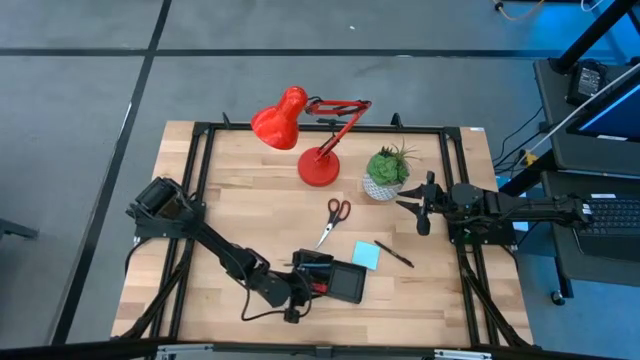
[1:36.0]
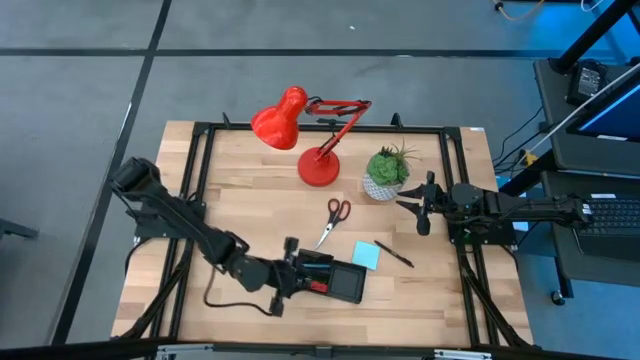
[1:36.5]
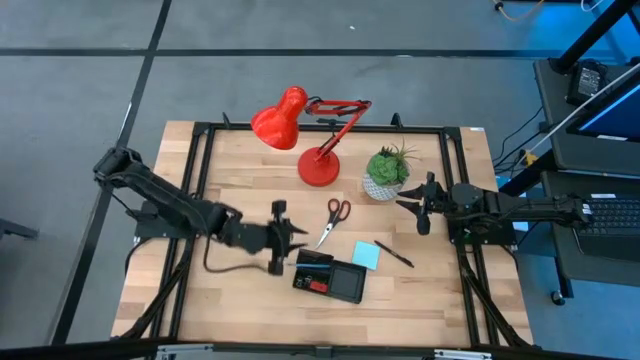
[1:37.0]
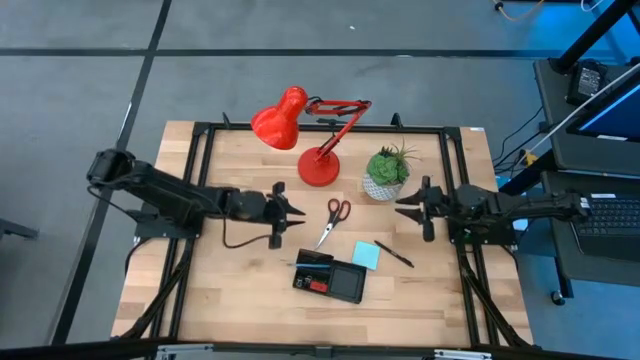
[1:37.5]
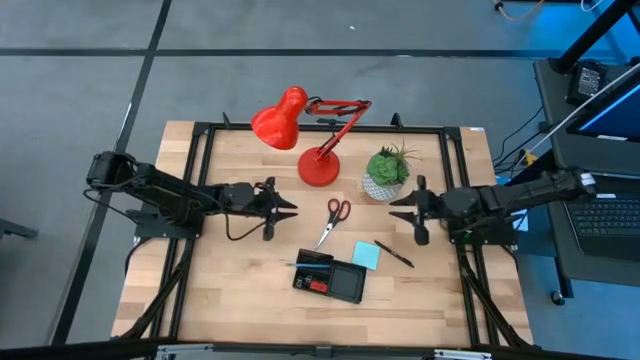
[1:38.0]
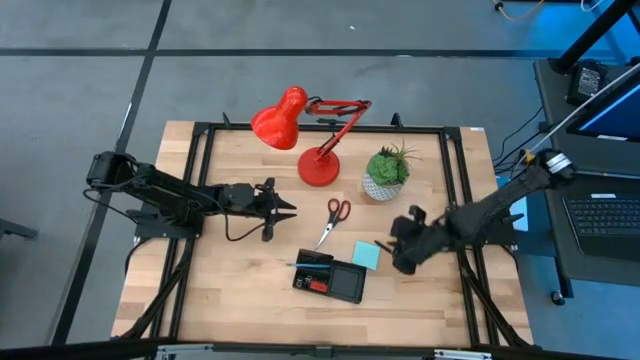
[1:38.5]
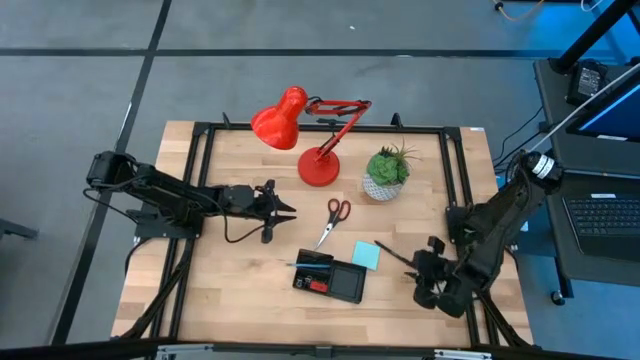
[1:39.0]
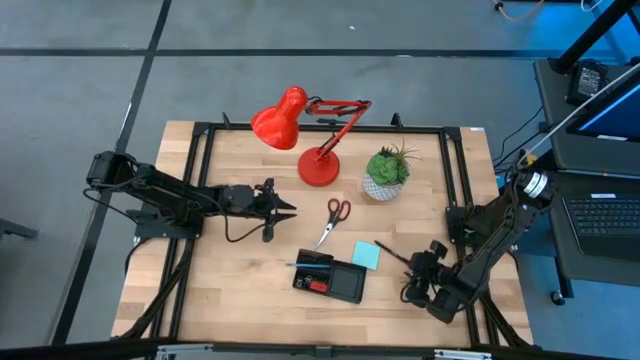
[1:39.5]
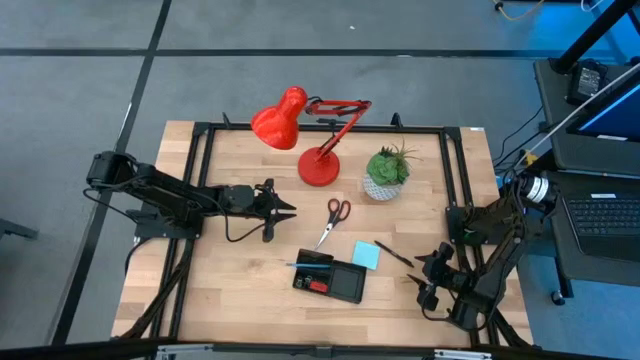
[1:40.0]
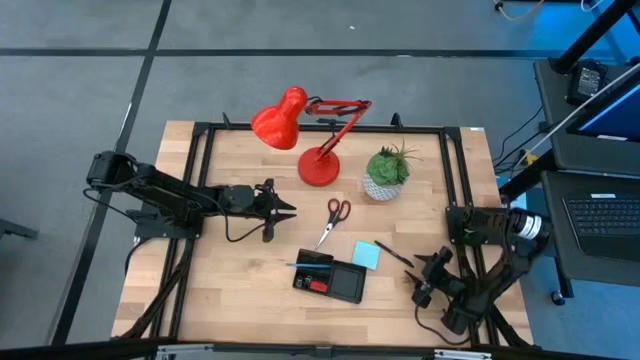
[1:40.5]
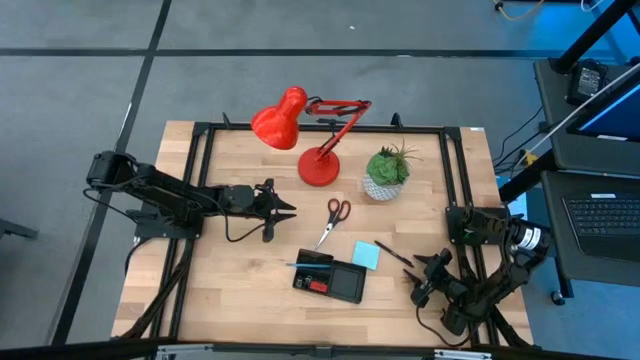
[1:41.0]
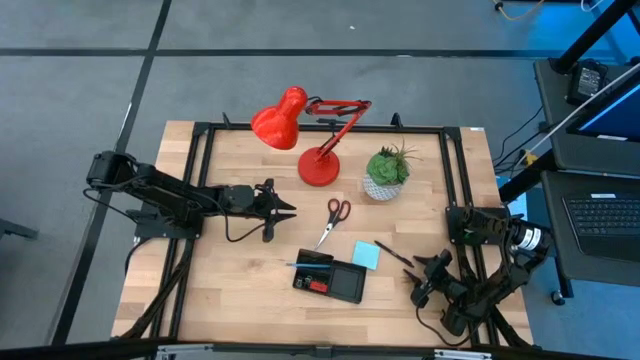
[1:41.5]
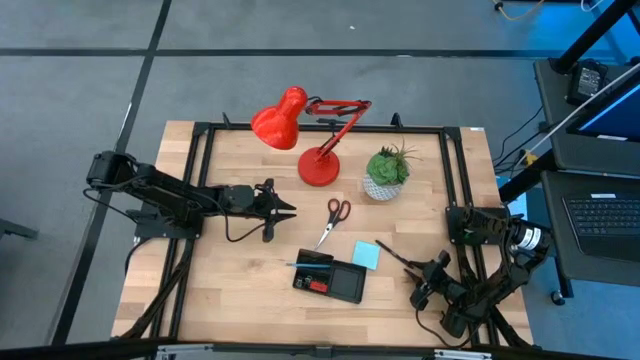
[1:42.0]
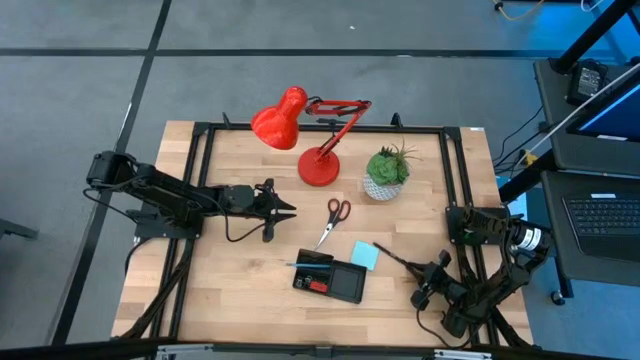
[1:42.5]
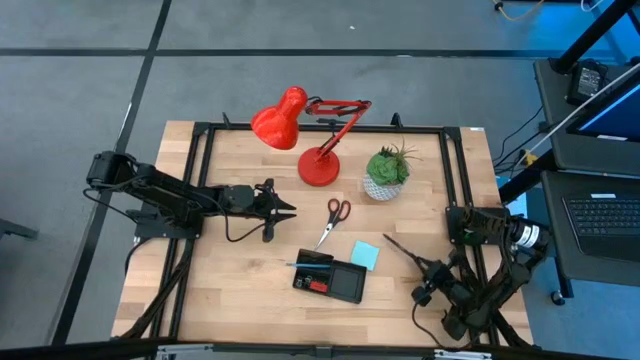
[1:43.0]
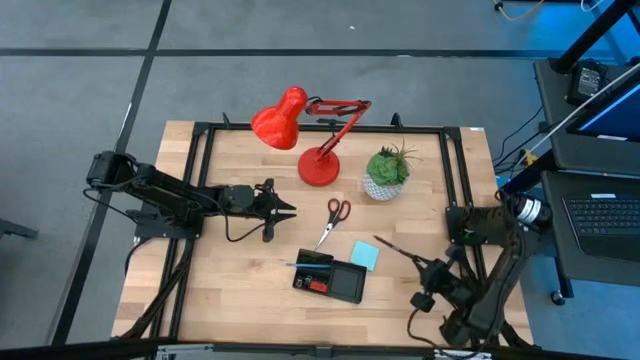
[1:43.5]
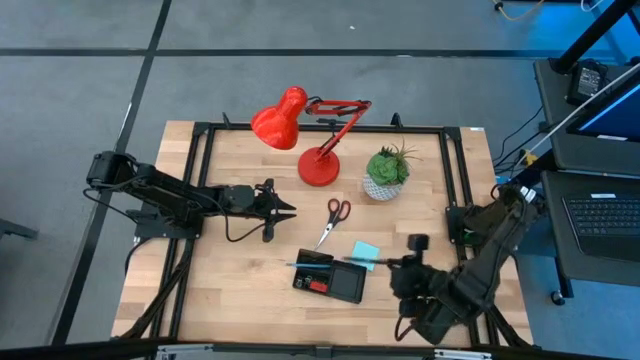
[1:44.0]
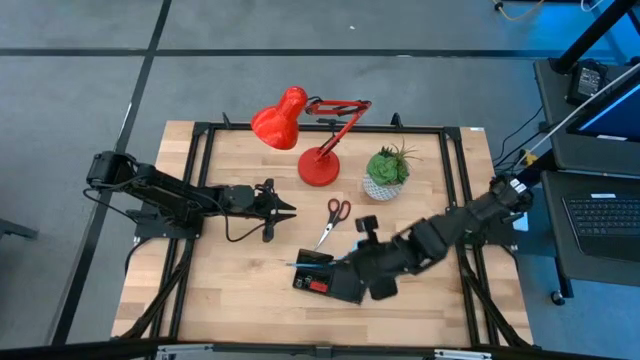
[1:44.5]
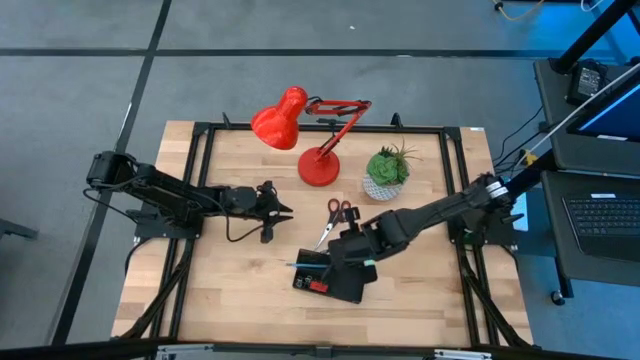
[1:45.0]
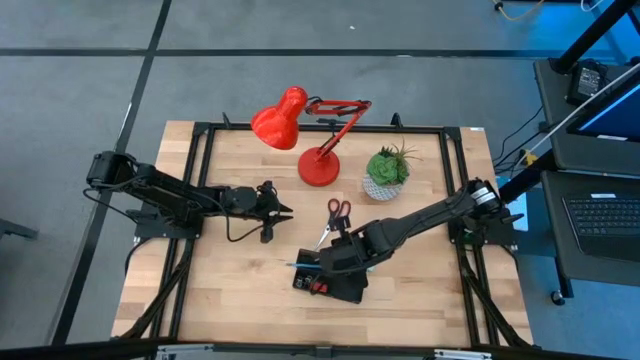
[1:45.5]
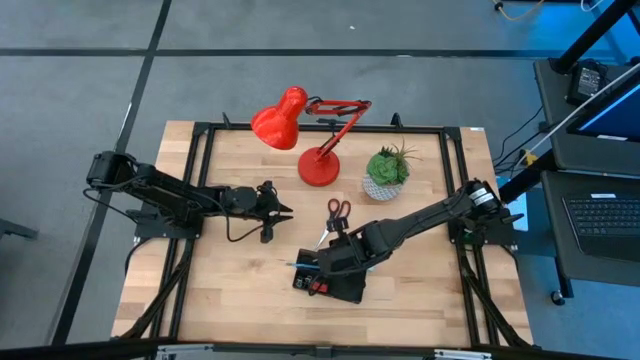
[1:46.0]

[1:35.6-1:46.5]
Task: Pick and place office supplies into organizer
Put the black pen into the black desk organizer

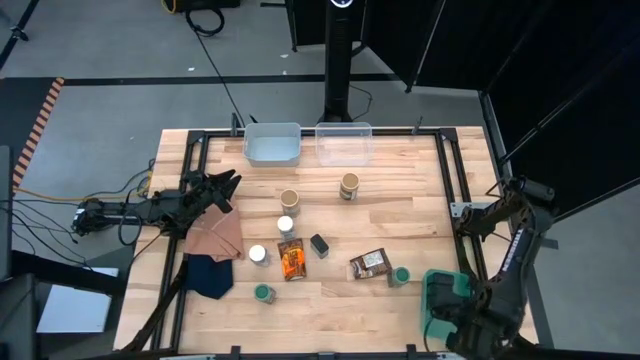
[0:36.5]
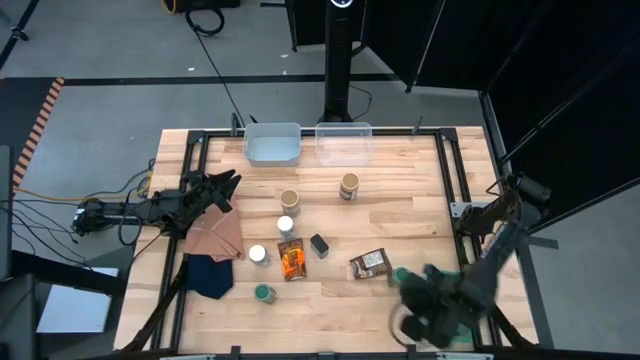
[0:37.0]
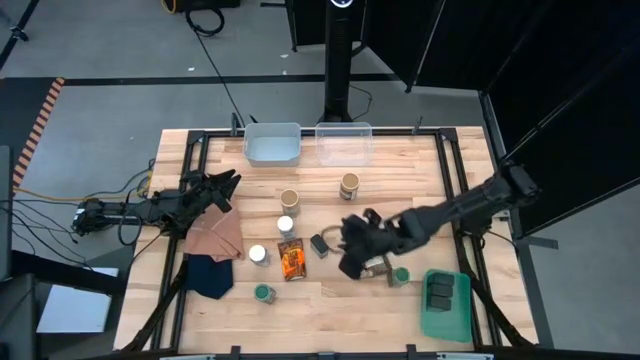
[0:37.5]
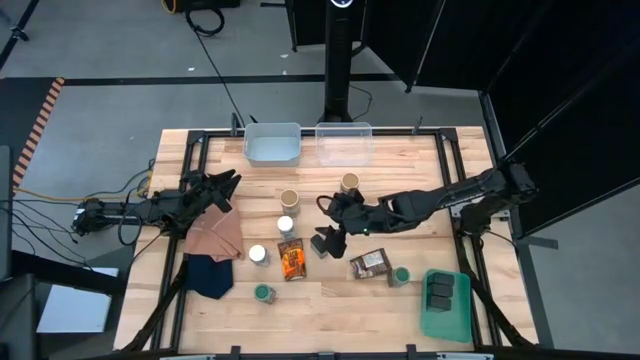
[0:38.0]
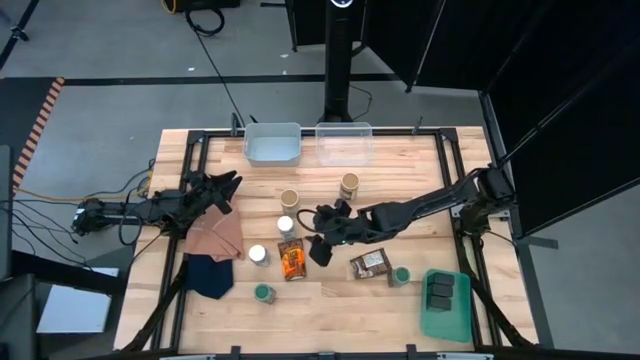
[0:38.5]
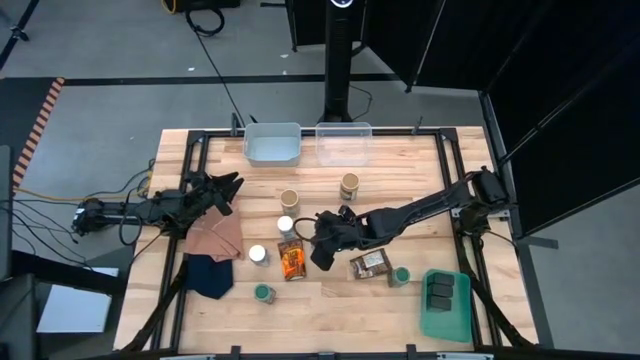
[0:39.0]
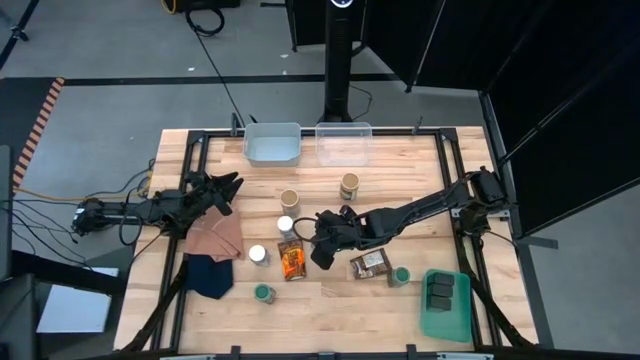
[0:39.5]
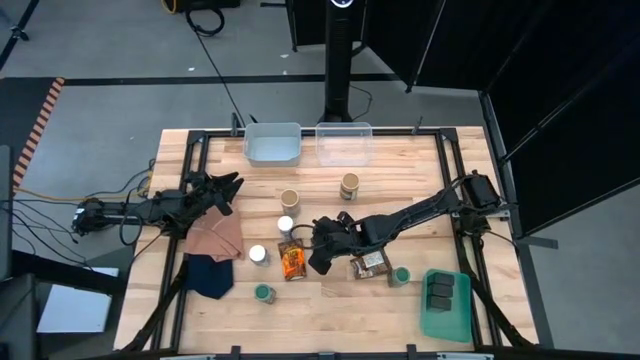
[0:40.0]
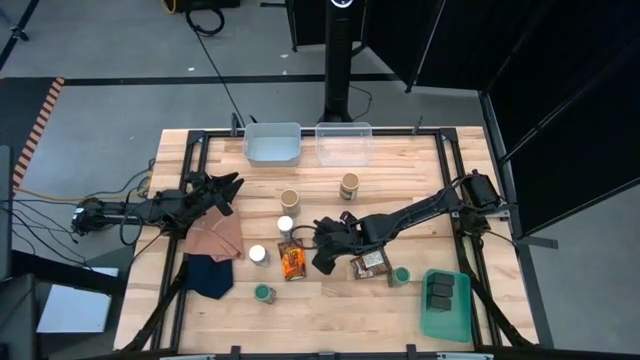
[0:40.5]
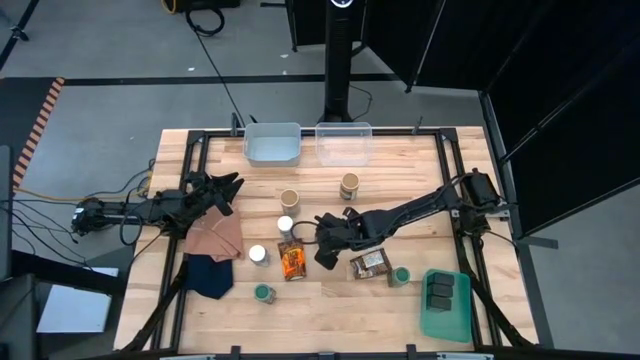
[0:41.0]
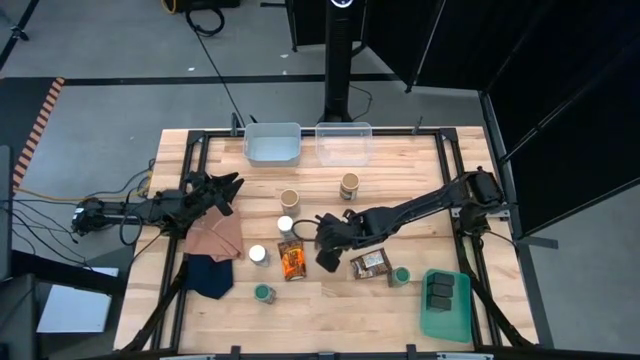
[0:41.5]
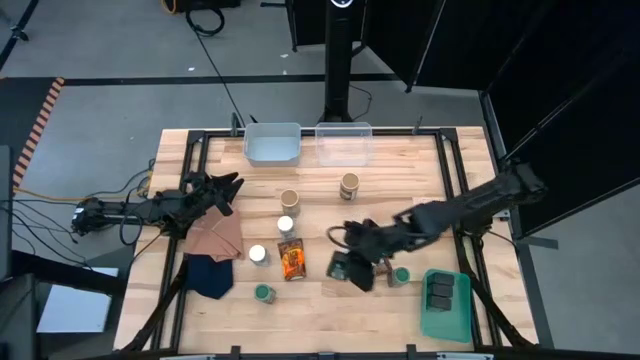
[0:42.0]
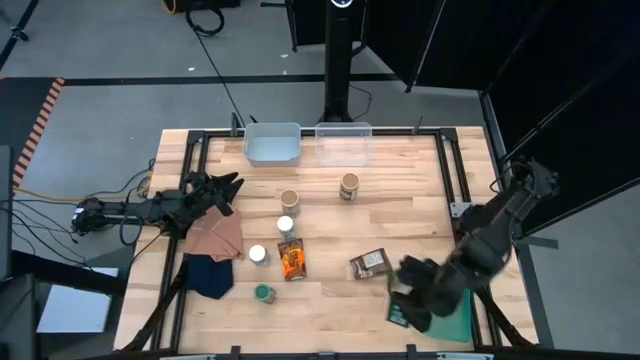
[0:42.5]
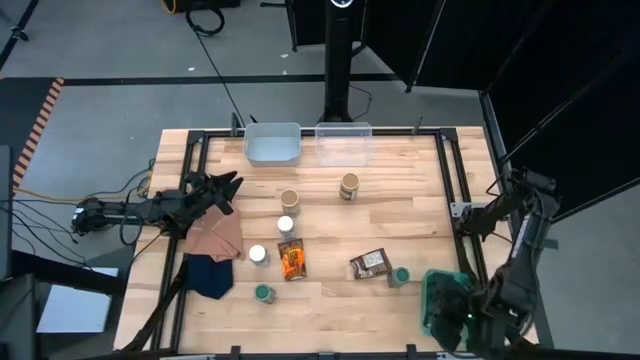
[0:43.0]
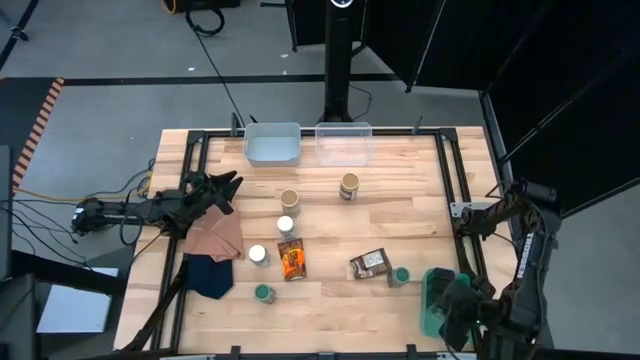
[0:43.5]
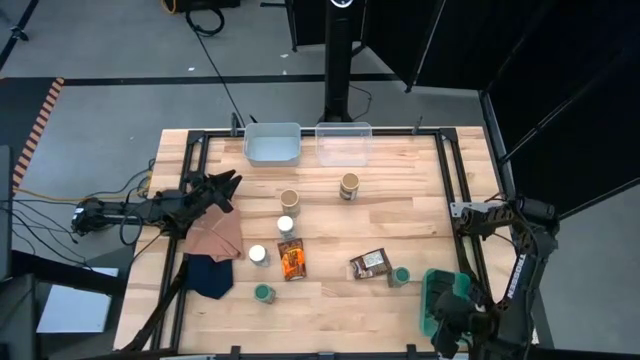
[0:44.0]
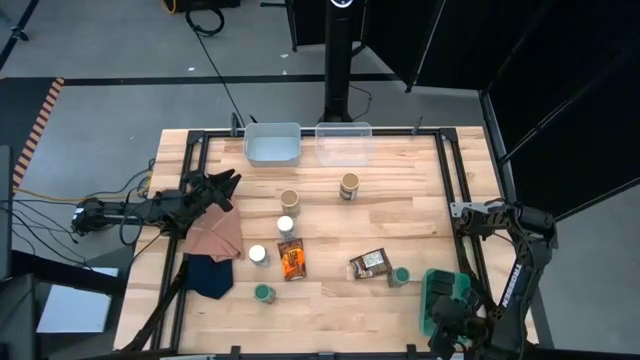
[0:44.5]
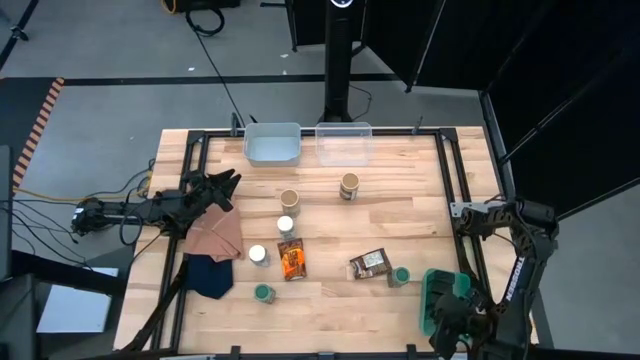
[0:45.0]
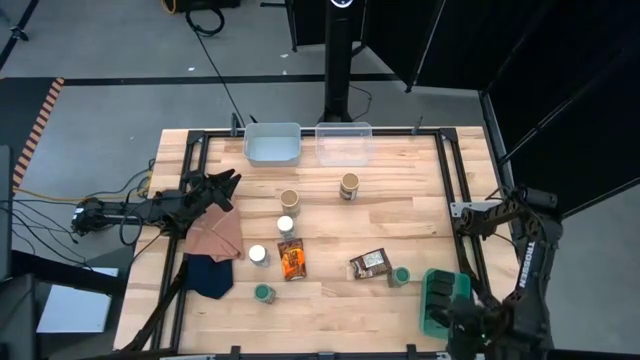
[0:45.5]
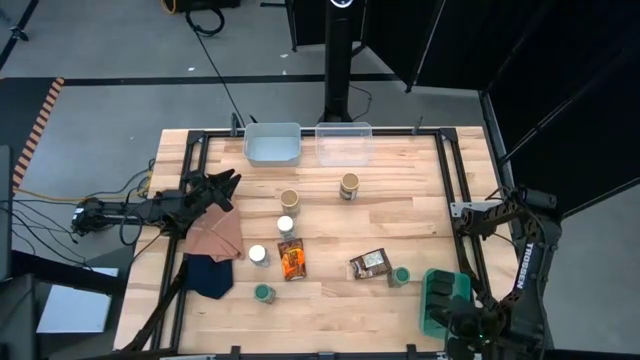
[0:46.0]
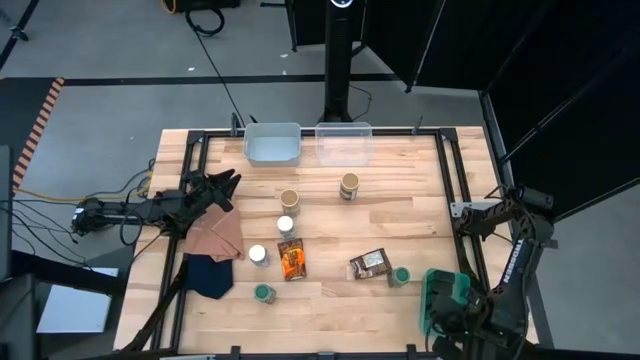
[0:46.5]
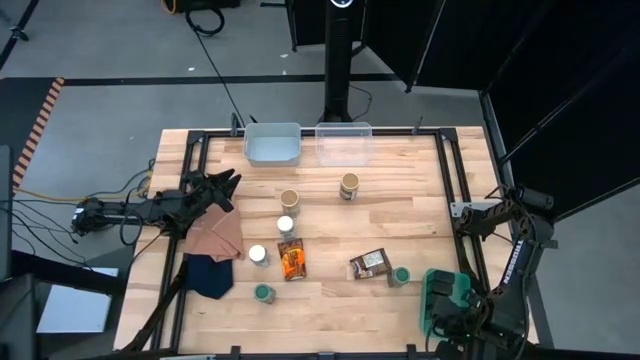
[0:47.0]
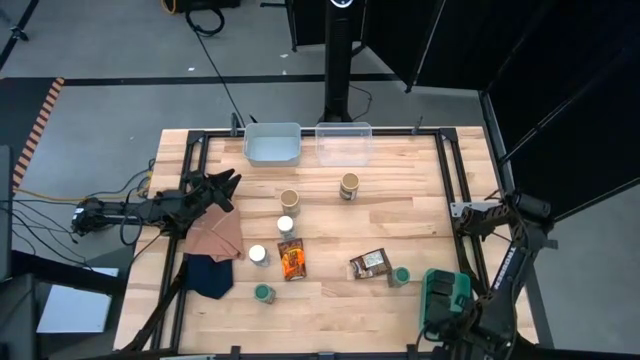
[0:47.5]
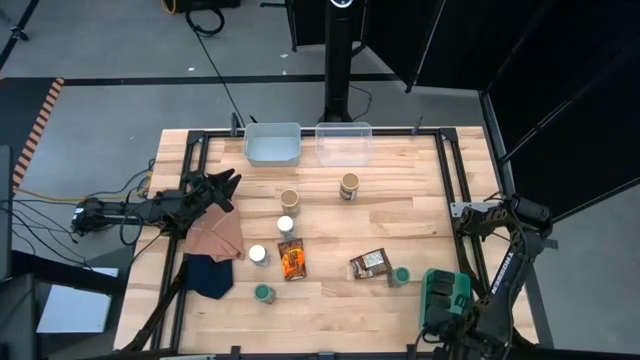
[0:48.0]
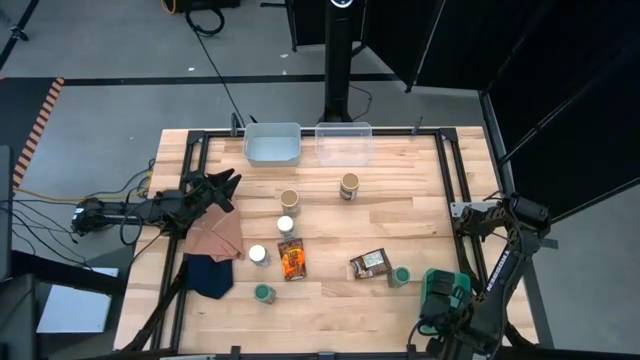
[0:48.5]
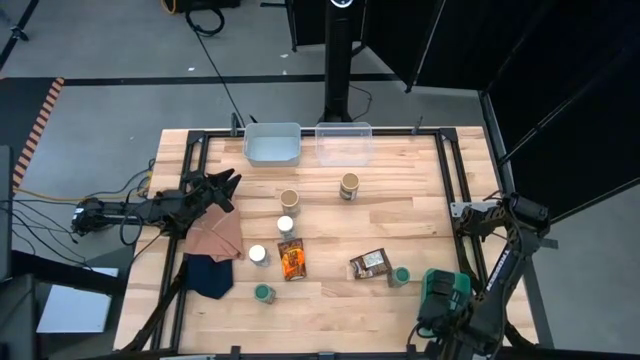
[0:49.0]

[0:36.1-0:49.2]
Task: Sort spices by type
Put the black seasoning bottle into the transparent bin
